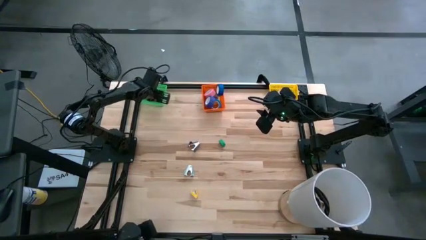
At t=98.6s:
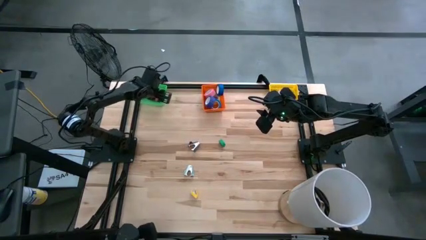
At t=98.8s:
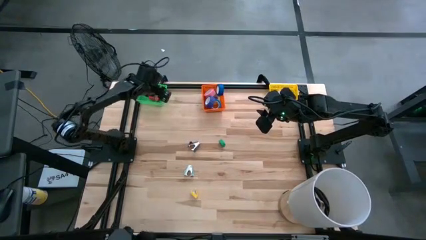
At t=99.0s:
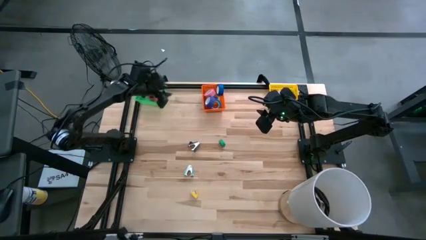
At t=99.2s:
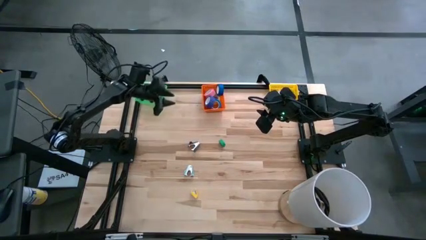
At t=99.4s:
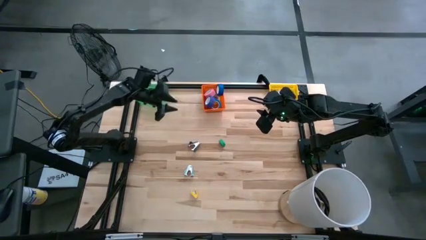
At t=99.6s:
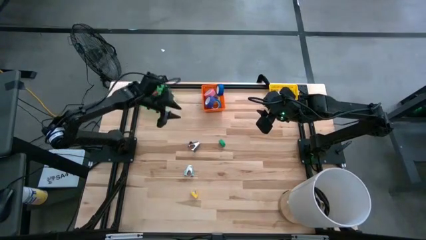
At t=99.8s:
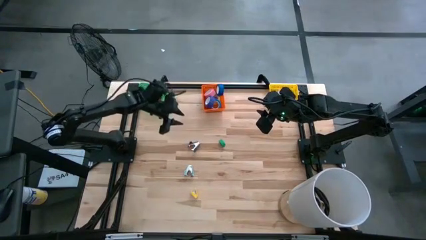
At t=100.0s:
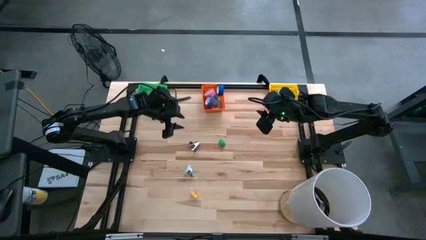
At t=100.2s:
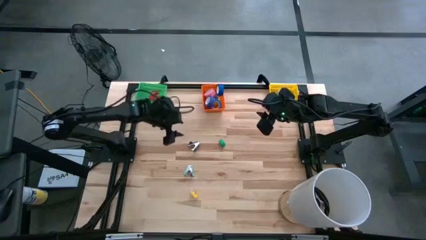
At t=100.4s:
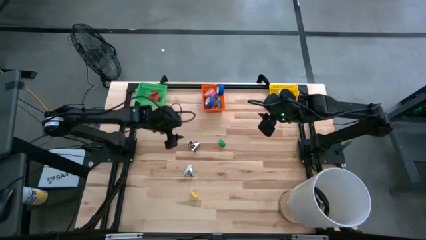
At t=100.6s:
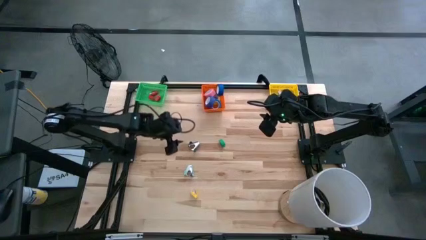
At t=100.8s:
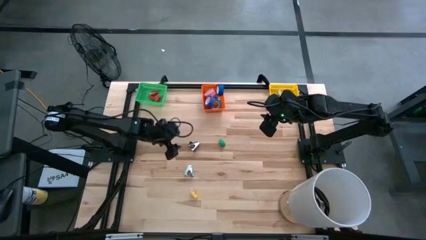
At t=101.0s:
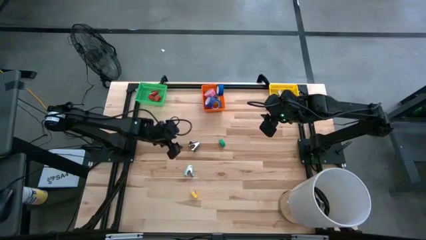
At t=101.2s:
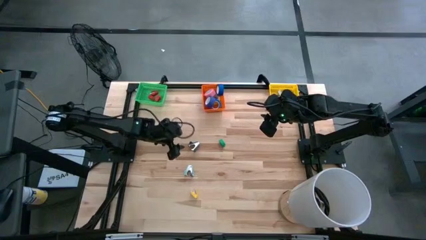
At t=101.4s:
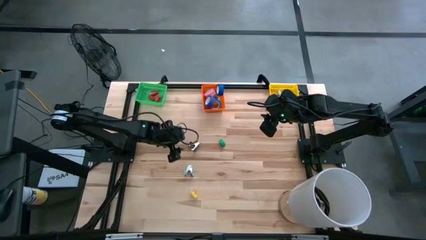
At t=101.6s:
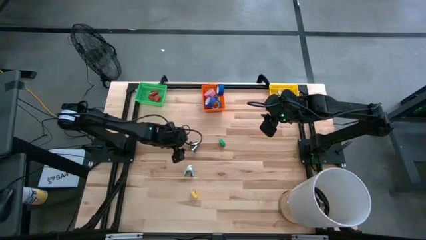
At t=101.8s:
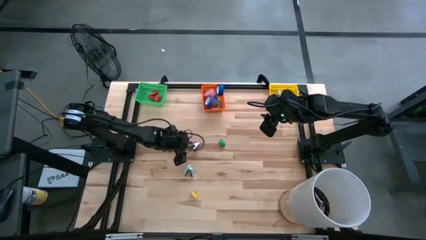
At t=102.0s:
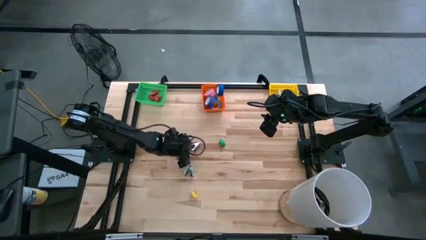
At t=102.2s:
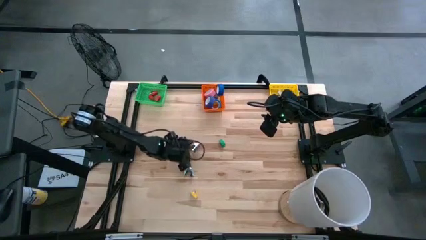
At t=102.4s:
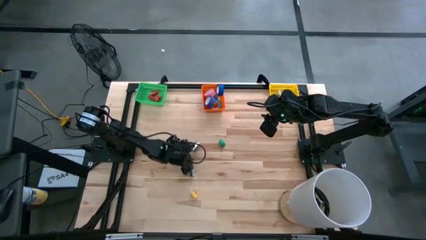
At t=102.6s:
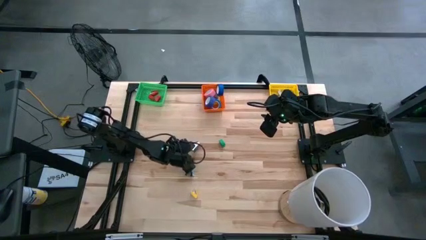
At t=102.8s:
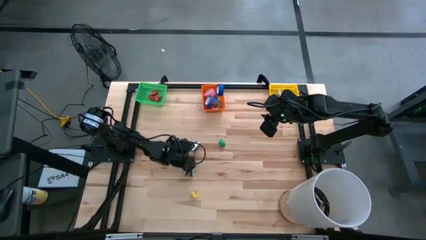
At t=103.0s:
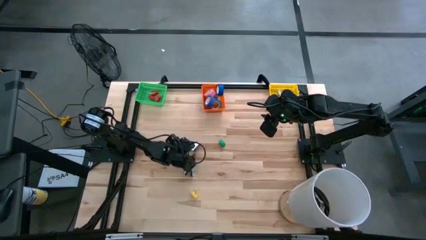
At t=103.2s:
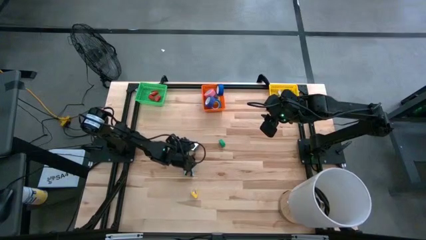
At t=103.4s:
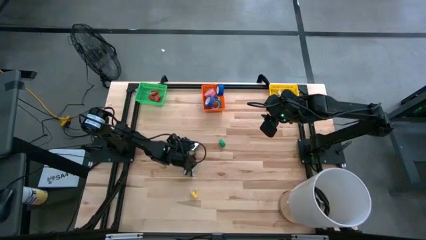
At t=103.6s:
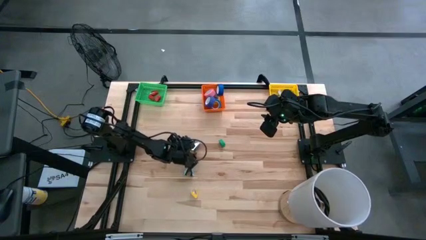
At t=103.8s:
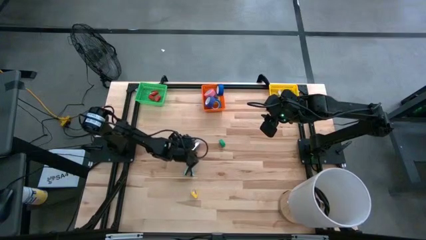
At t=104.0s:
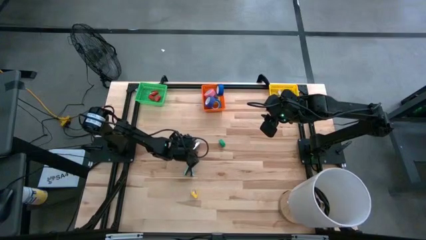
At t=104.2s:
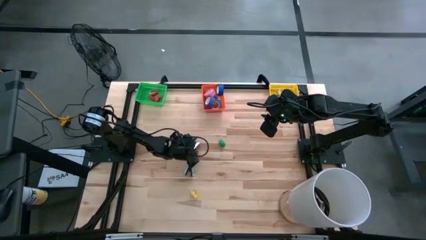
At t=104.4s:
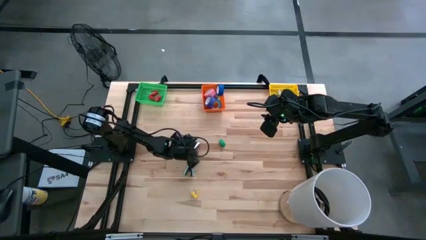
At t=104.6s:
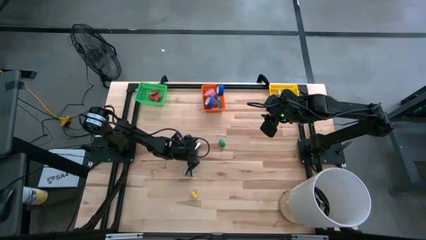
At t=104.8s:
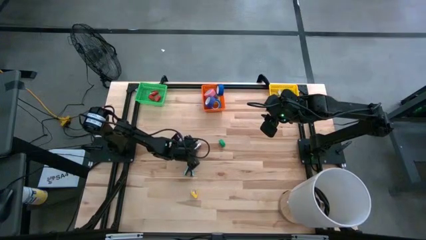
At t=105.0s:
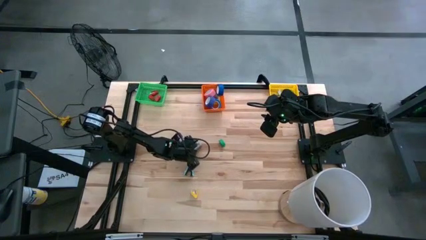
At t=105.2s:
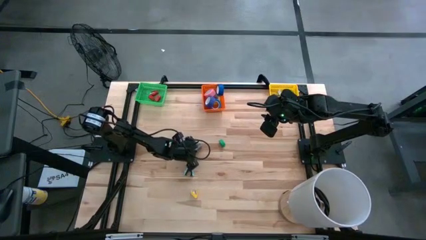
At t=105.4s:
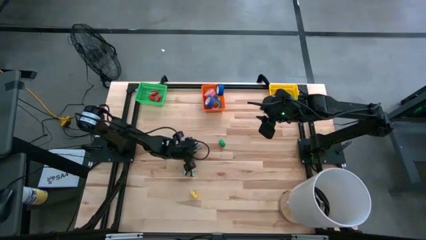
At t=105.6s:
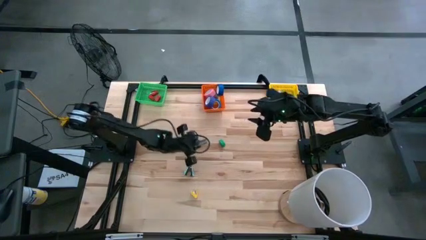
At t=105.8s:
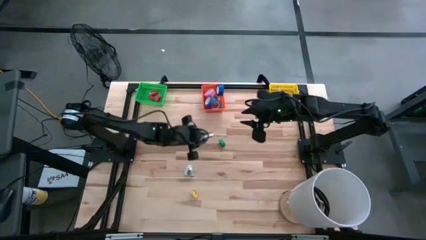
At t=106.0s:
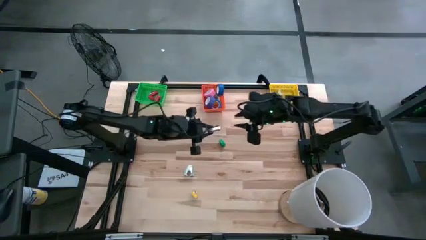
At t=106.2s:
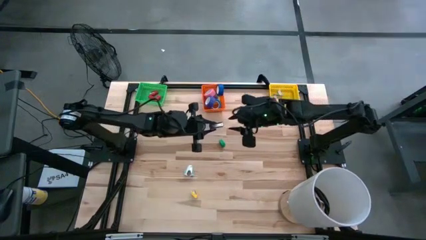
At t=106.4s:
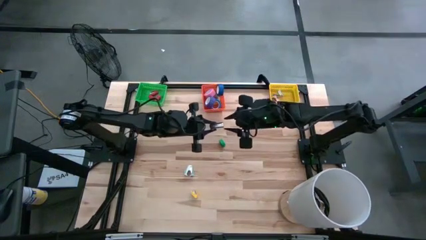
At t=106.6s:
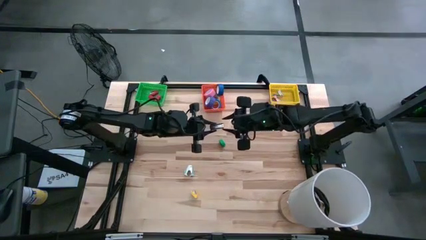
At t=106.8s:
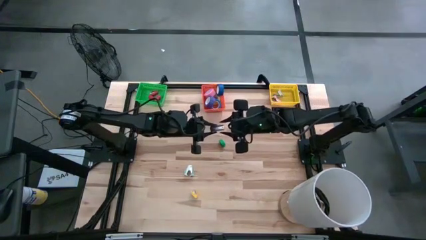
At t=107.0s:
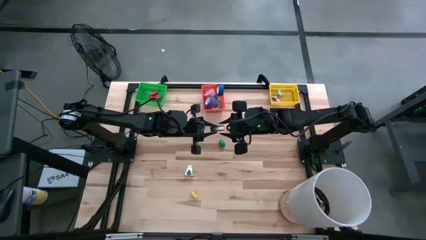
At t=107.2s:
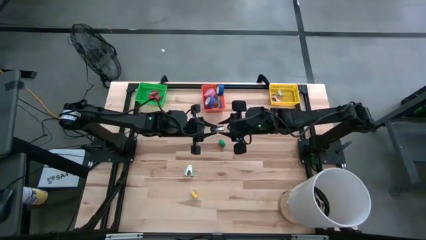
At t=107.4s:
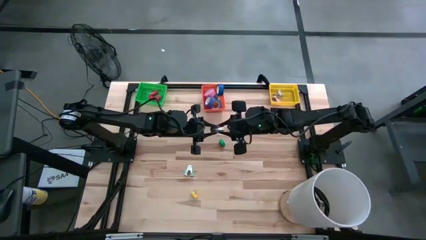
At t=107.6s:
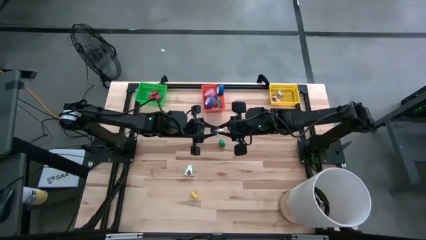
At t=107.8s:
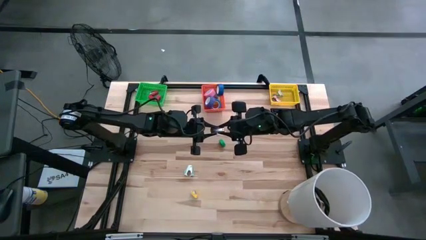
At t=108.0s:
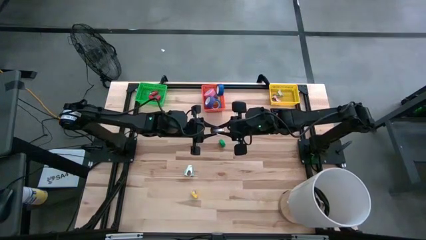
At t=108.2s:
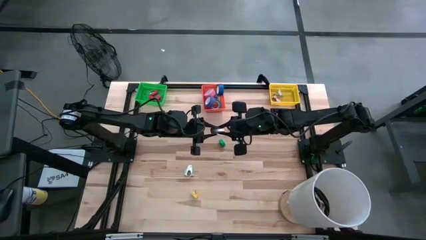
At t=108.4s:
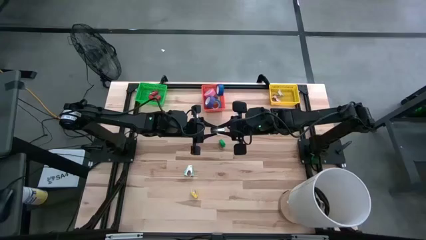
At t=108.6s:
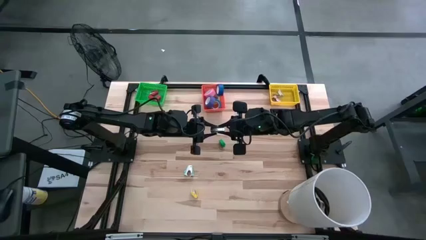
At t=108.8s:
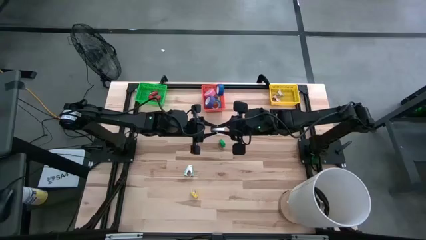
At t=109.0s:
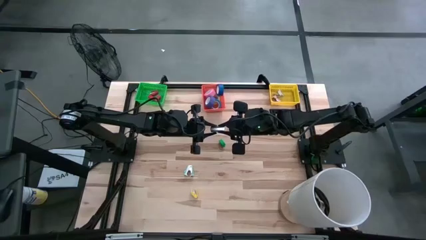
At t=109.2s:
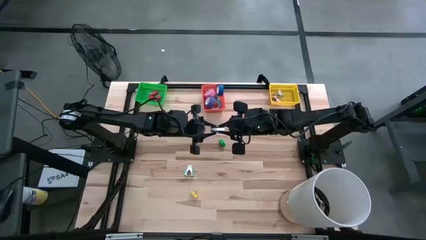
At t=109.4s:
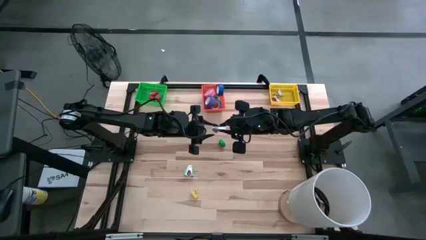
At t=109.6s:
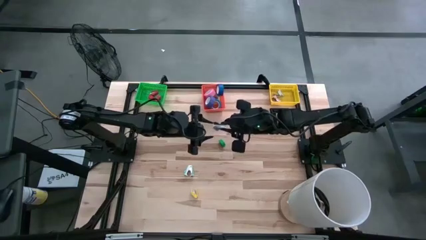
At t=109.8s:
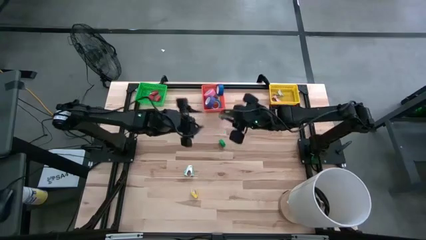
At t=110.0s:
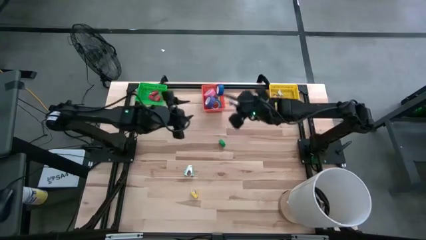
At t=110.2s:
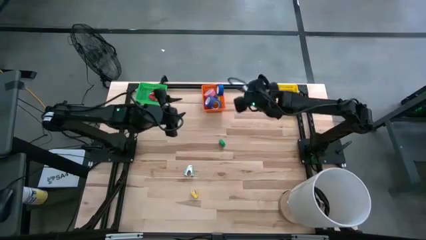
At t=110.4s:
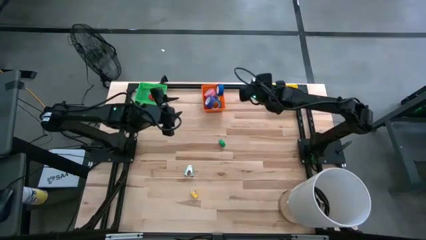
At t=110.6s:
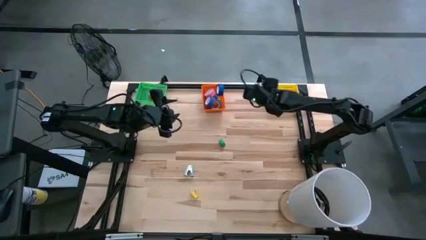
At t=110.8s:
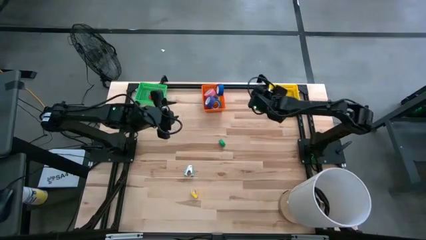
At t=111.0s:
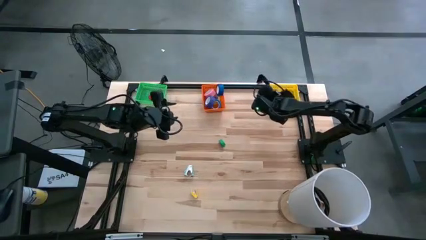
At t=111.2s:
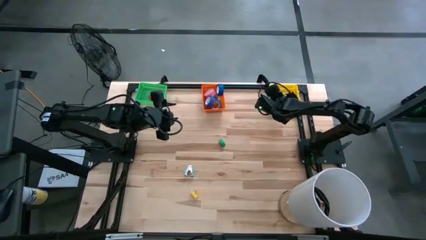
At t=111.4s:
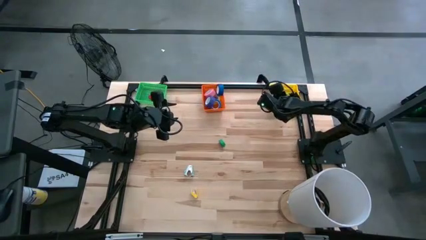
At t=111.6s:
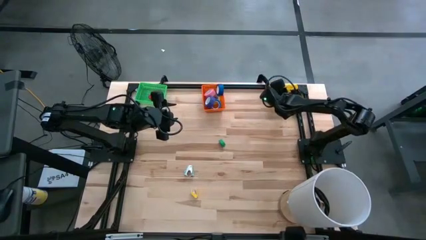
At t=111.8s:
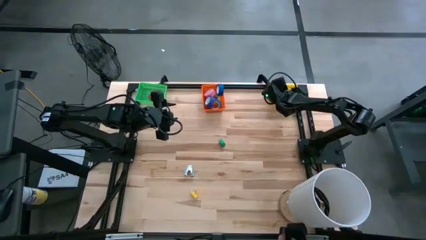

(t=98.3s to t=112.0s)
Task: Pick and place Stapler, Stapler remover, tape
Put the black staple remover into the yellow bin
